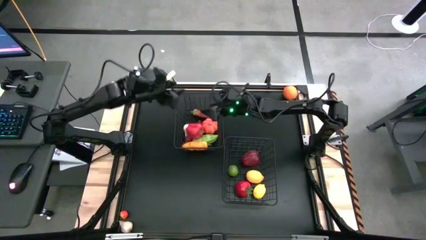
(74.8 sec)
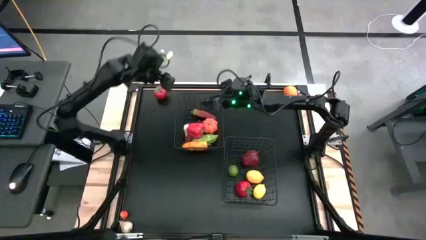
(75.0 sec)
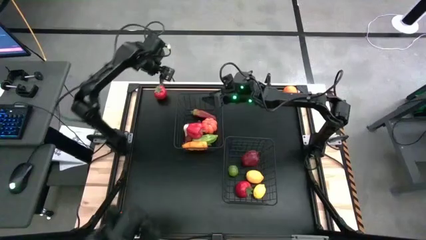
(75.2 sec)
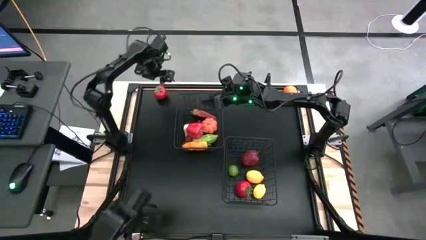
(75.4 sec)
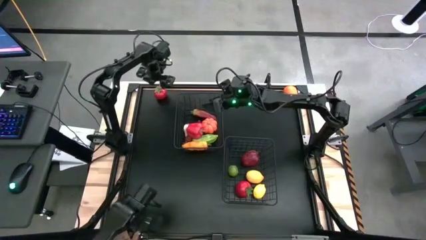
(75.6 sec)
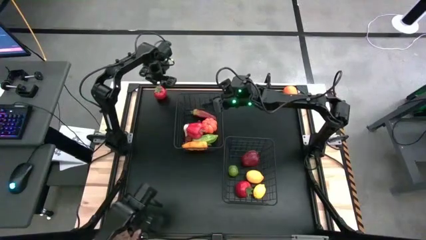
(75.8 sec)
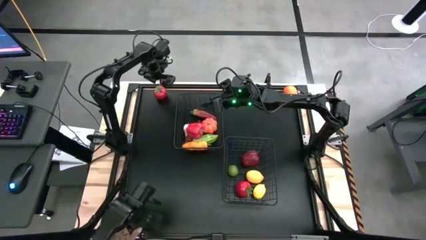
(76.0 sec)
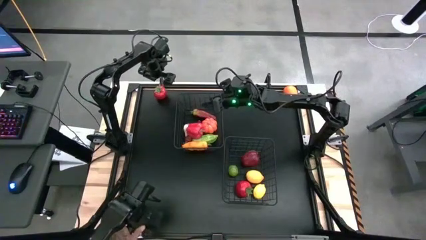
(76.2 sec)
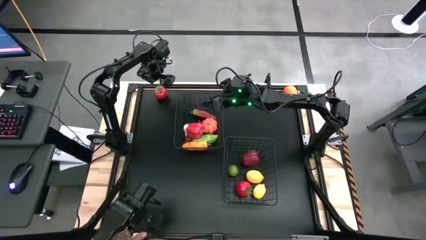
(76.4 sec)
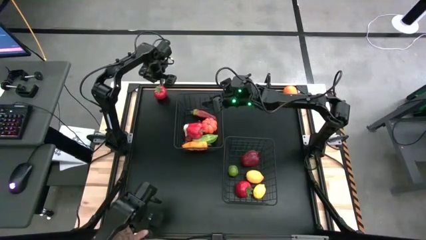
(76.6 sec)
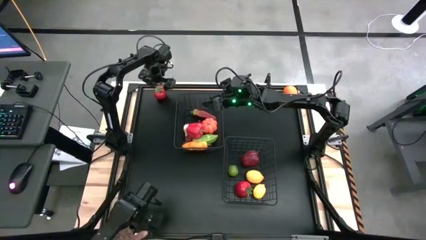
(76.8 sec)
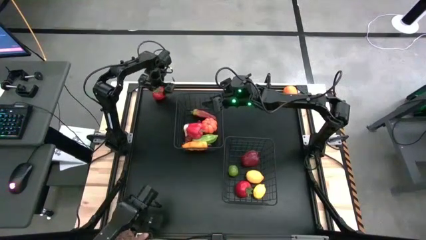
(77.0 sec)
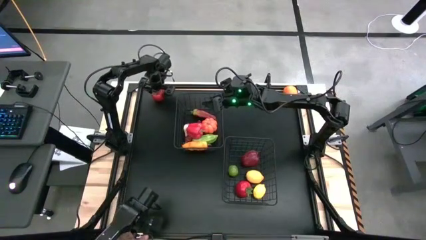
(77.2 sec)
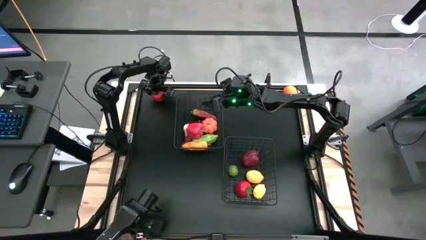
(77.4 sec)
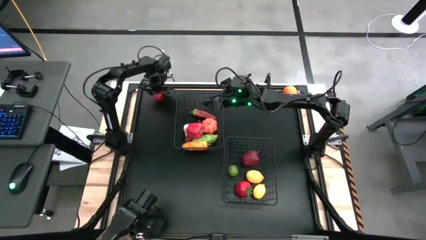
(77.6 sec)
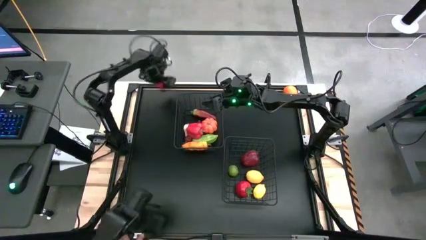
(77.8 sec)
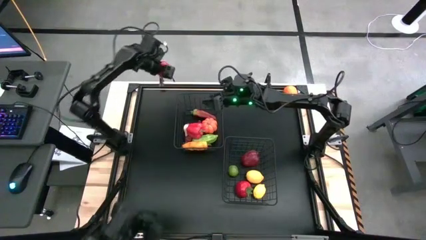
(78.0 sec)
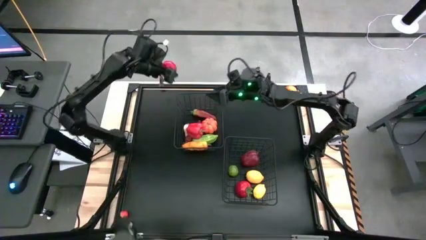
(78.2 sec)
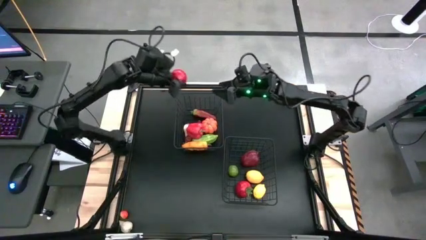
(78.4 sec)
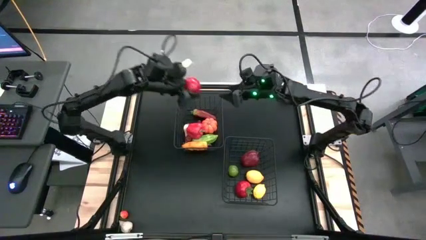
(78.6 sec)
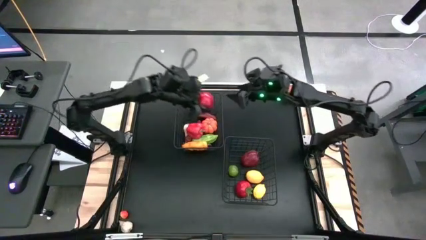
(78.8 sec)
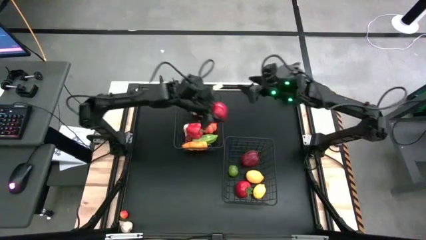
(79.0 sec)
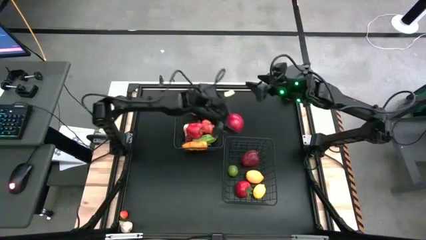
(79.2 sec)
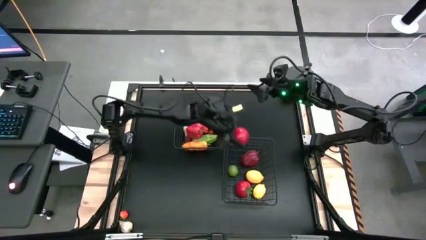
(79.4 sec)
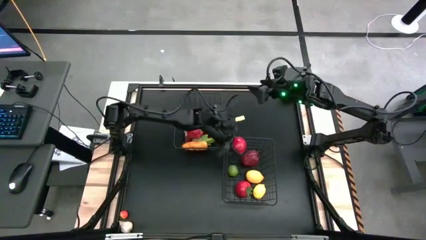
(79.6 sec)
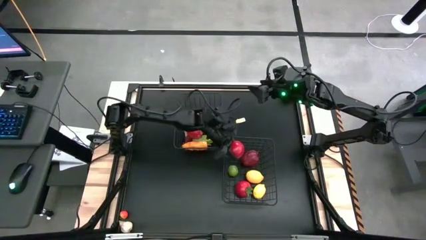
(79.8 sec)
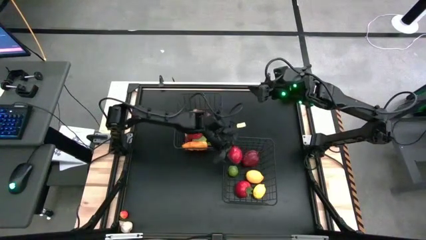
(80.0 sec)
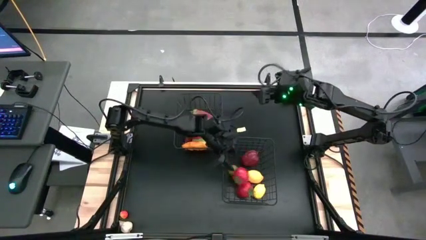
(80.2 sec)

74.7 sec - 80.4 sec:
Task: Sort produce into baskets
Put the top red tomato into the bottom black wire basket

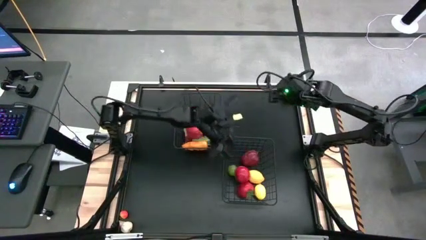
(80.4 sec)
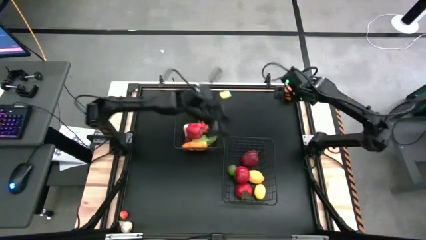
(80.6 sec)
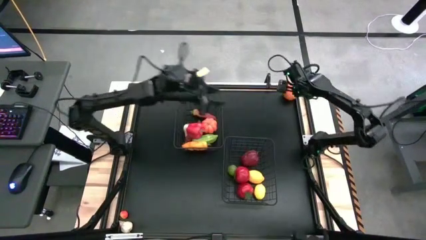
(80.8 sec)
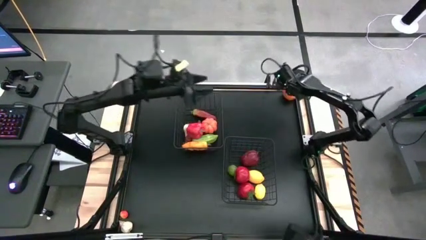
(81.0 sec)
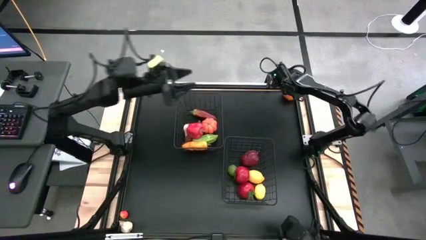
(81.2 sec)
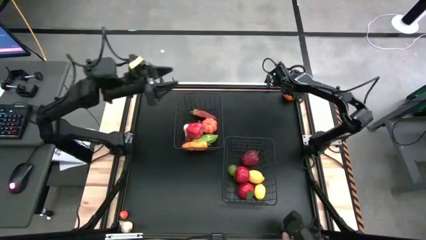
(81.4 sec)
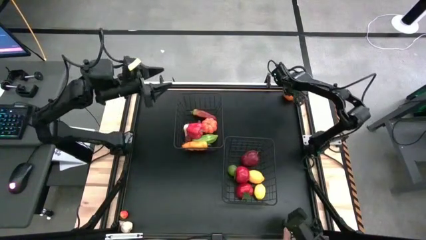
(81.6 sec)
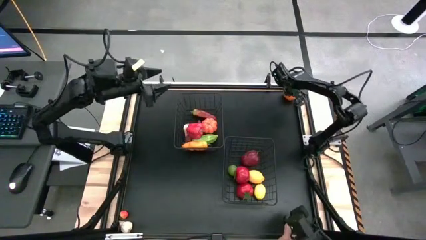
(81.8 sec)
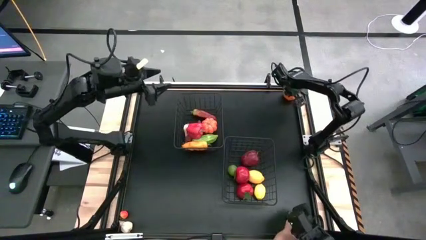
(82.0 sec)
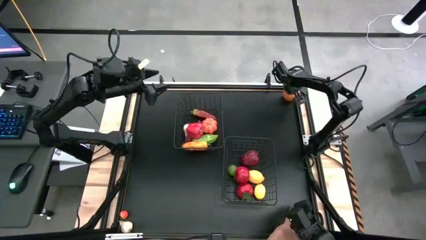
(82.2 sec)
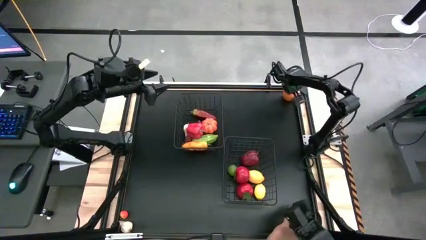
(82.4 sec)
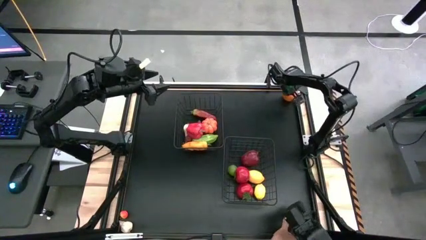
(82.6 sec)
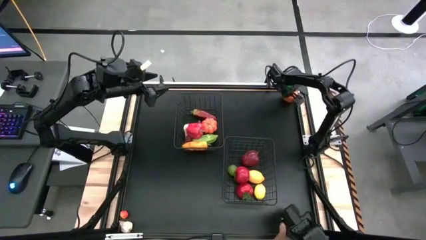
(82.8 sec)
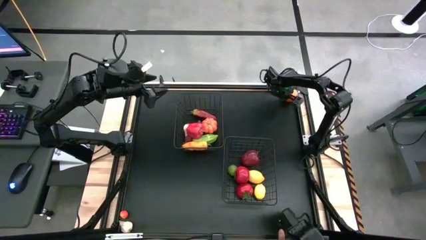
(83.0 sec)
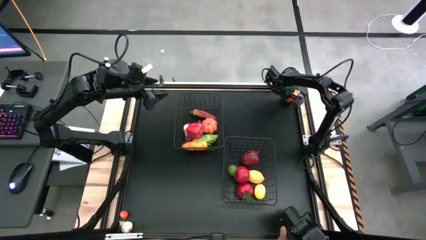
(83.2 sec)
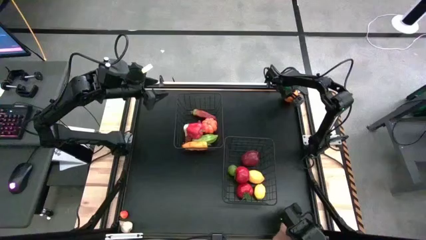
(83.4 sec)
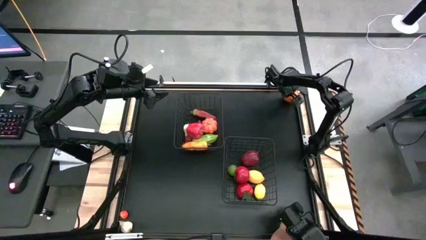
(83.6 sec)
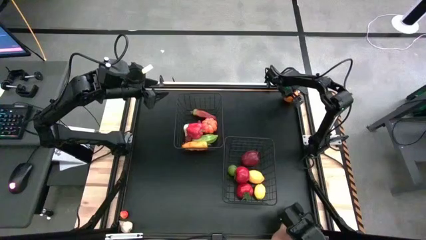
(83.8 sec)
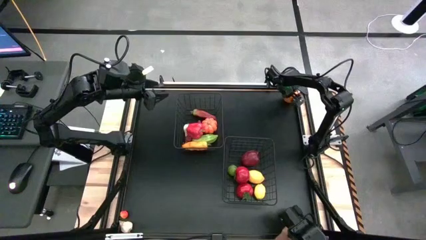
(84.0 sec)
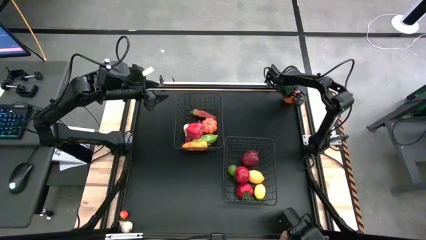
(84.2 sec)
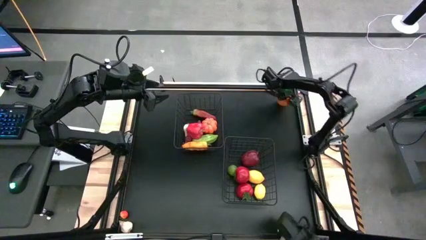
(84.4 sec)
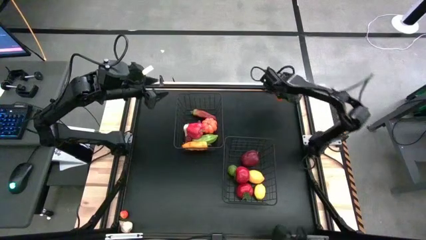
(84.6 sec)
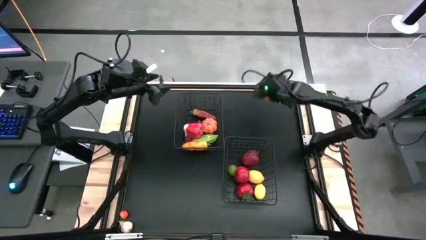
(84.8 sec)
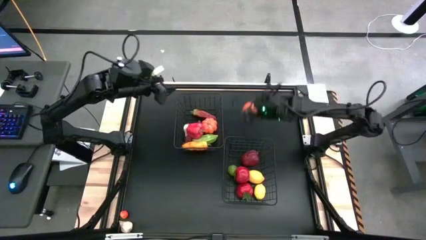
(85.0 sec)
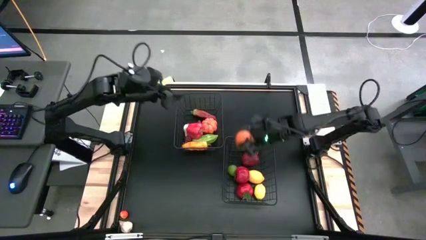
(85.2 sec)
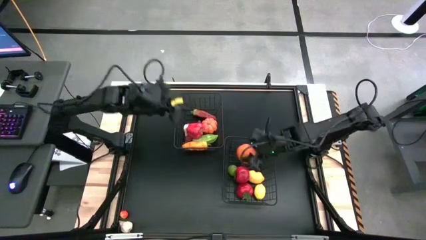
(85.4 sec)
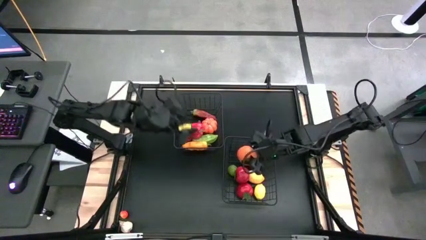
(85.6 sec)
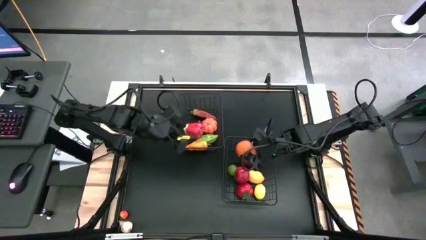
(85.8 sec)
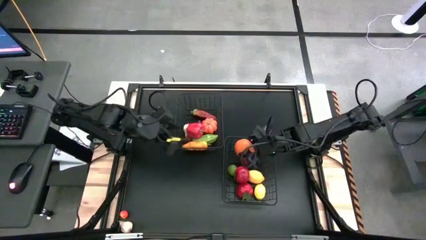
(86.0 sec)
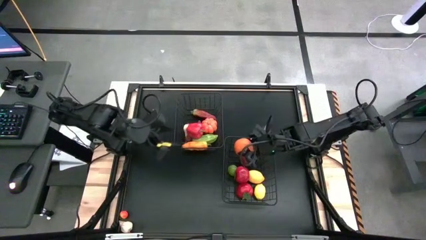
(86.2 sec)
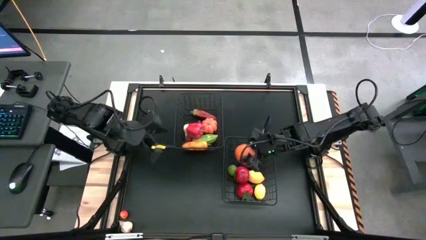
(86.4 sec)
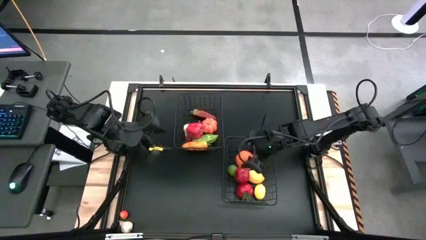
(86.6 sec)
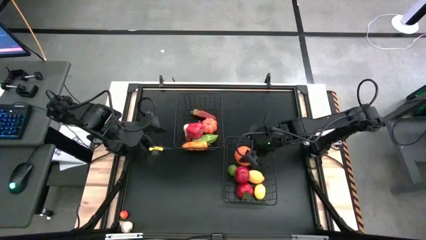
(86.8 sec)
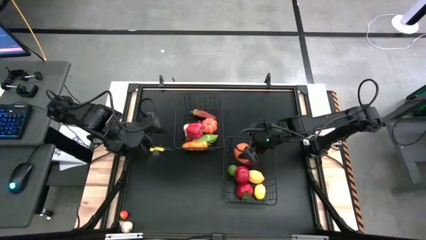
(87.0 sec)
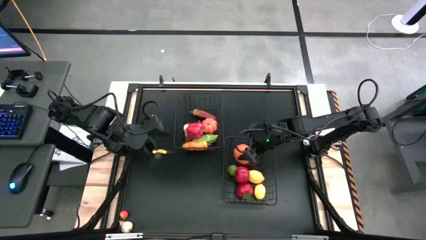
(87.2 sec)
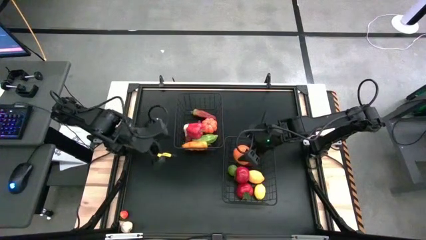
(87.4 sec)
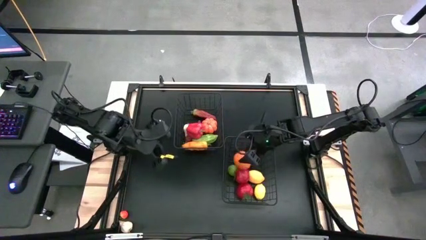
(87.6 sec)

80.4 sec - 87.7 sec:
Put the orange into the bottom black wire basket

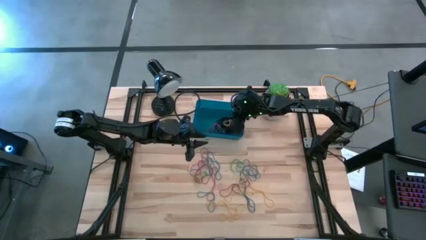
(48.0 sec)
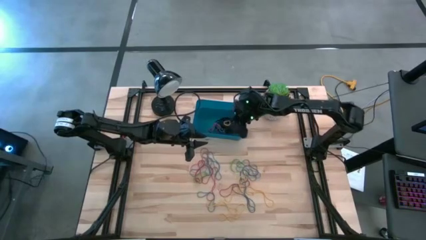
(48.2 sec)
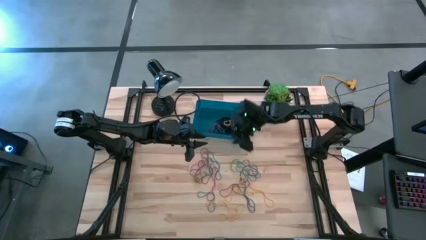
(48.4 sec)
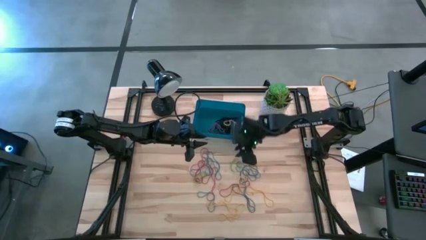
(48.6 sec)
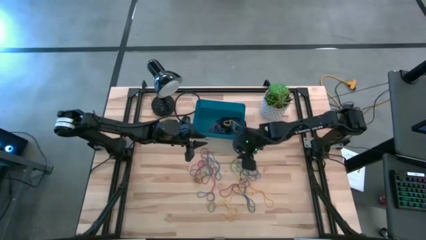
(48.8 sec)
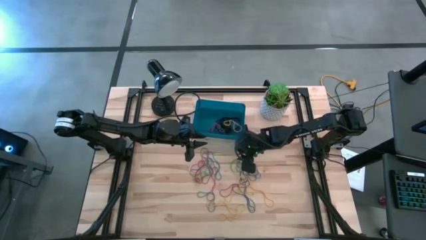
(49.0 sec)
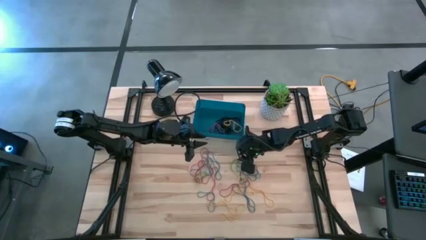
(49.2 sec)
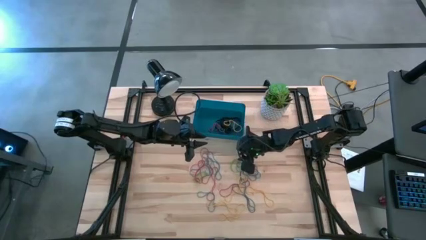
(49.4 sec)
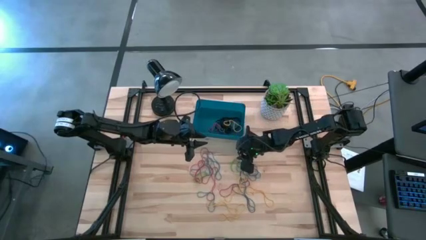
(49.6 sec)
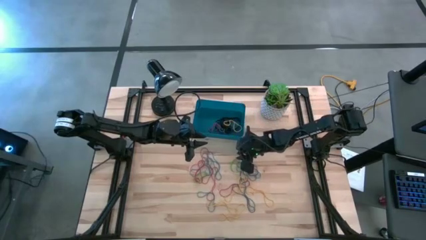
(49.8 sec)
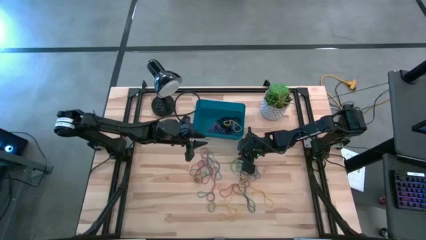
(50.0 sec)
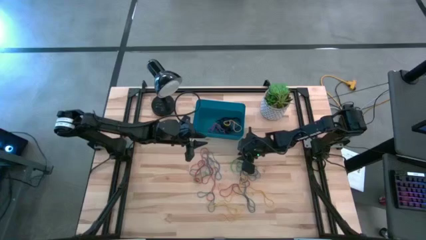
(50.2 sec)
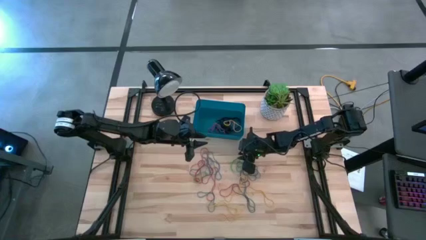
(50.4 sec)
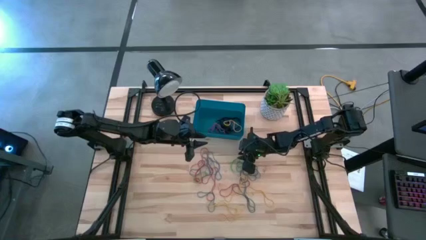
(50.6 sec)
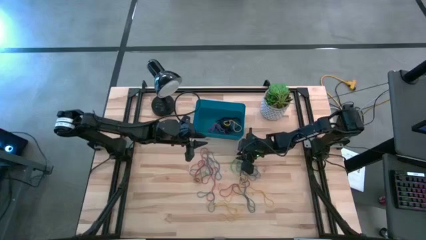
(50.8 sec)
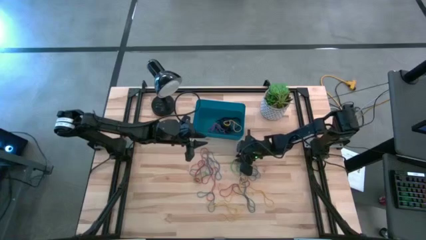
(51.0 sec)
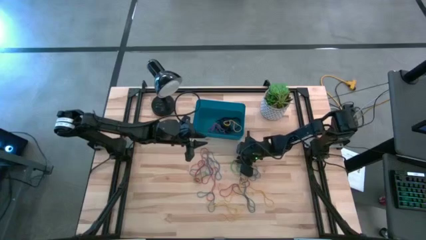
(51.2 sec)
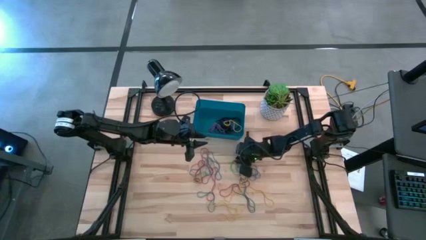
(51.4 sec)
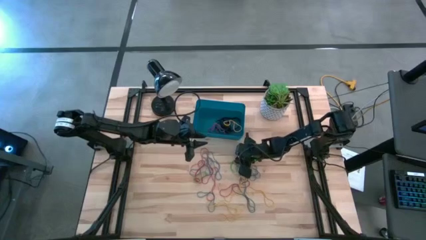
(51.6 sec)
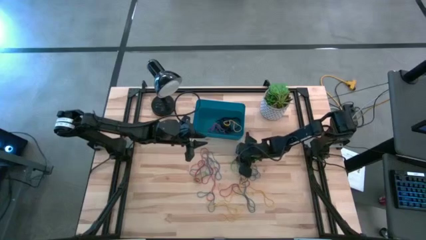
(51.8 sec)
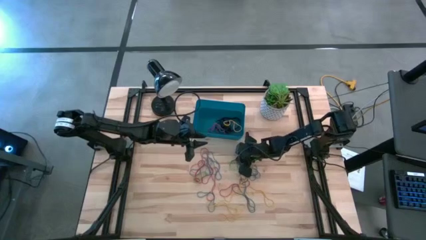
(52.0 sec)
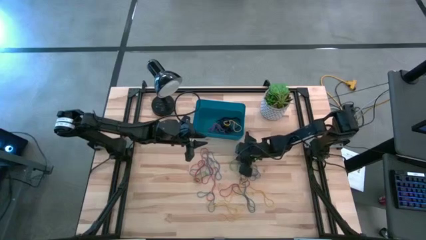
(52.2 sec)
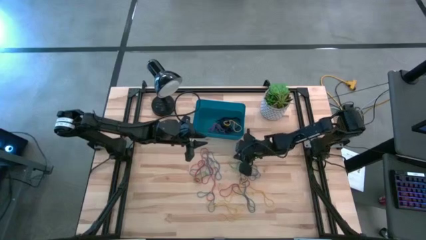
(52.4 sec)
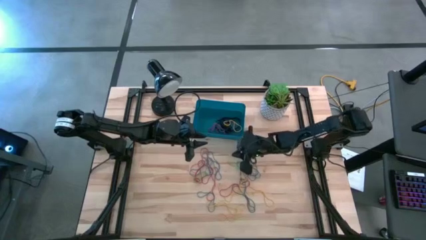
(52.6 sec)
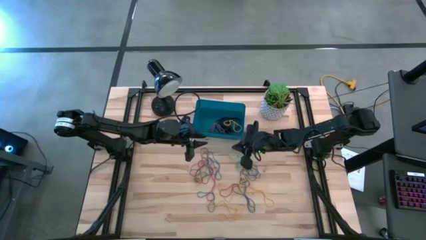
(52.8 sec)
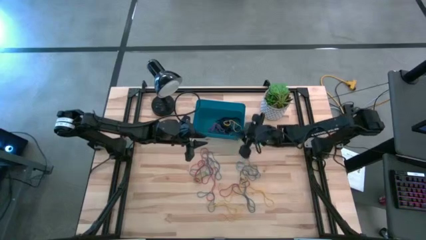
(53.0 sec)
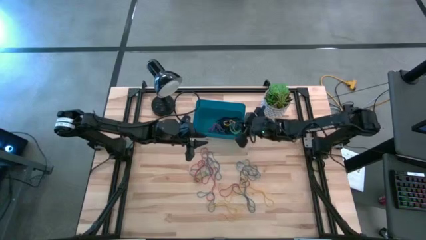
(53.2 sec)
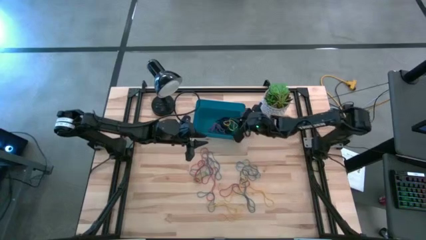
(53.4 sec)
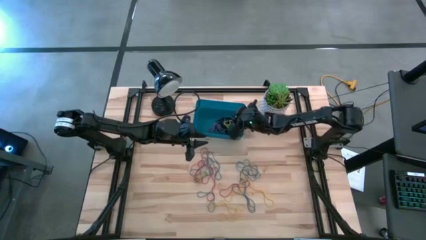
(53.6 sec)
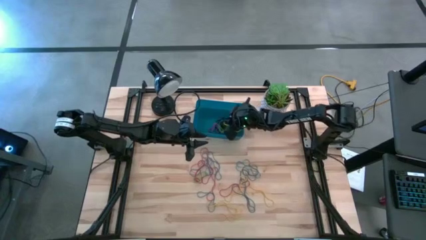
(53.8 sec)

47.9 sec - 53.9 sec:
Task: Pick and place rubber bands into bin
Put the right green rubber band into the blue bin
